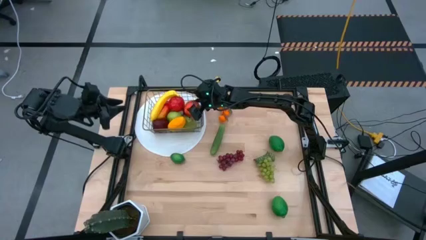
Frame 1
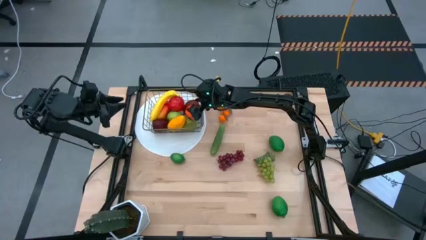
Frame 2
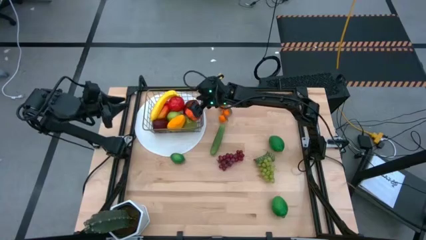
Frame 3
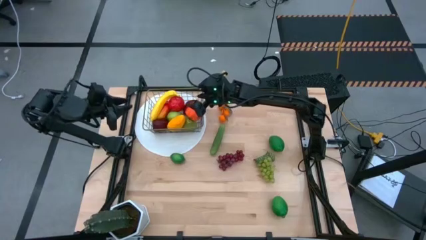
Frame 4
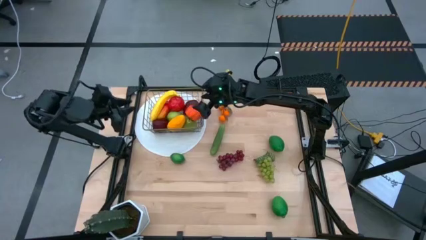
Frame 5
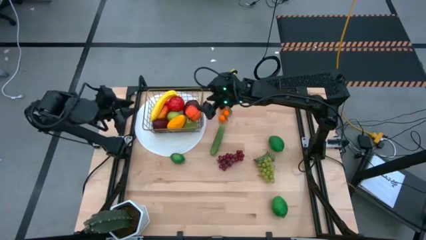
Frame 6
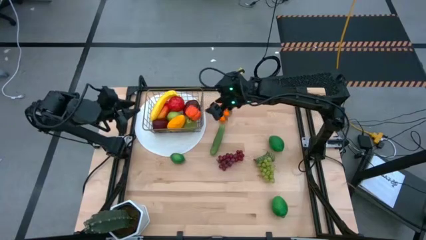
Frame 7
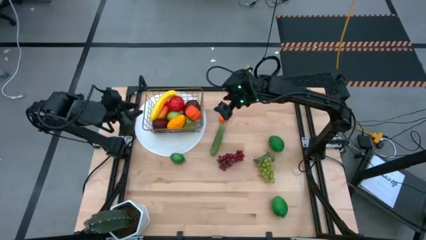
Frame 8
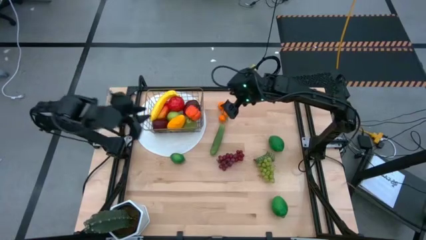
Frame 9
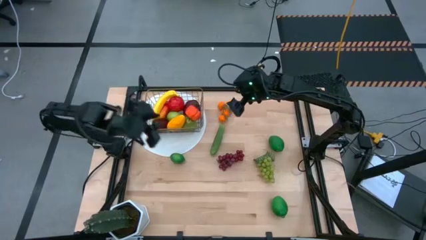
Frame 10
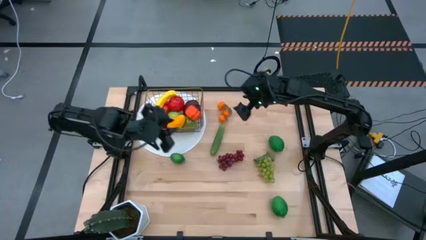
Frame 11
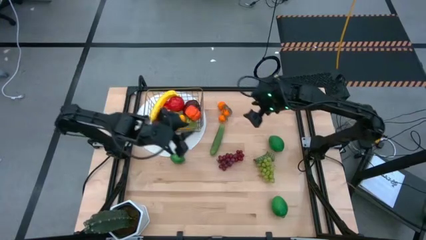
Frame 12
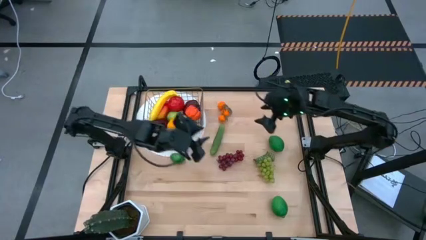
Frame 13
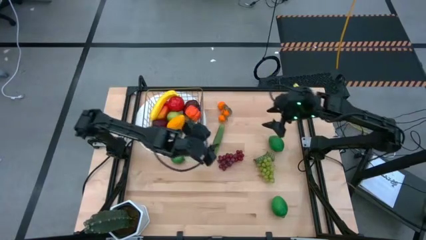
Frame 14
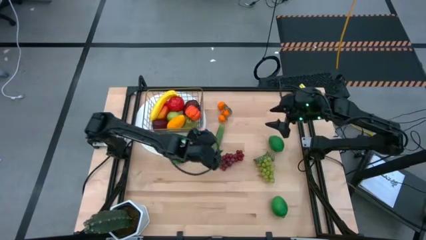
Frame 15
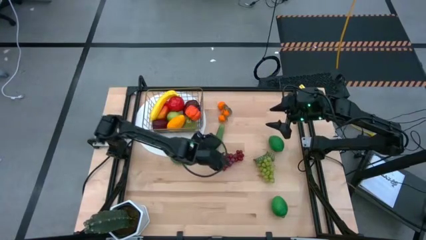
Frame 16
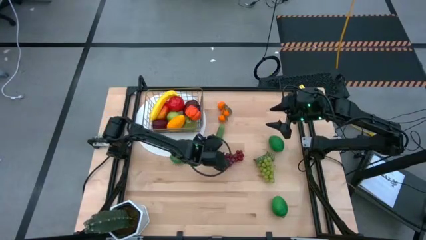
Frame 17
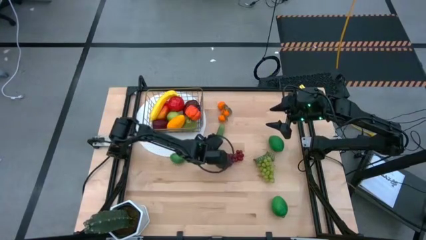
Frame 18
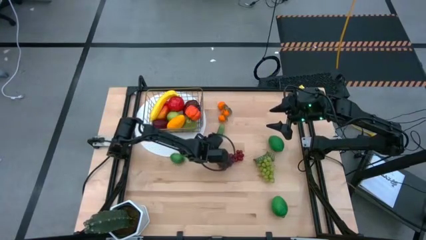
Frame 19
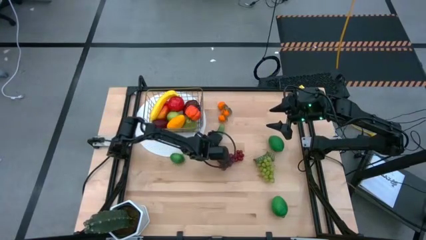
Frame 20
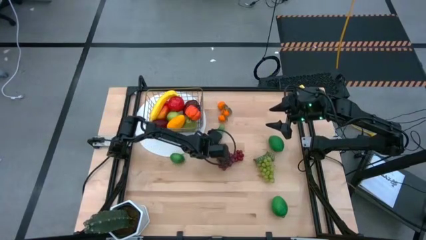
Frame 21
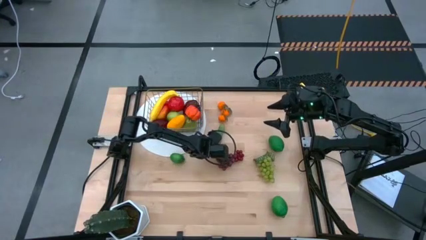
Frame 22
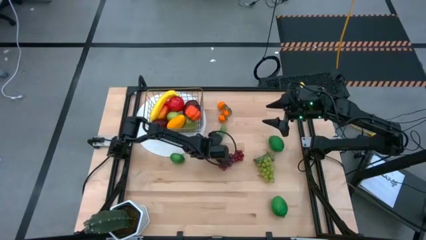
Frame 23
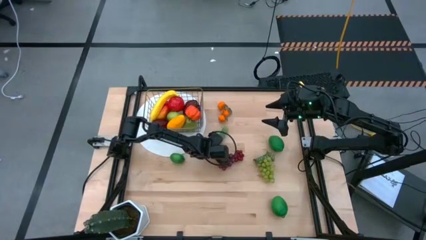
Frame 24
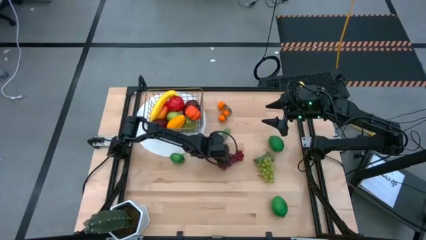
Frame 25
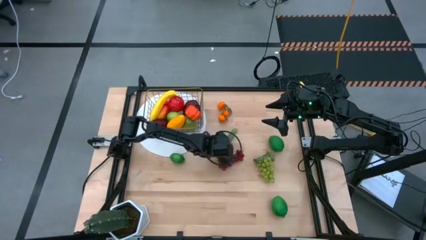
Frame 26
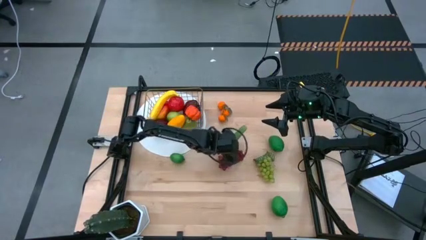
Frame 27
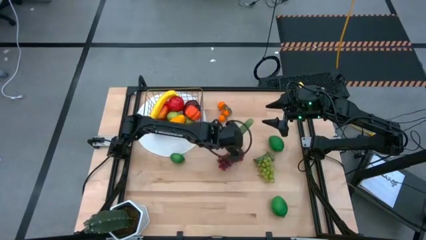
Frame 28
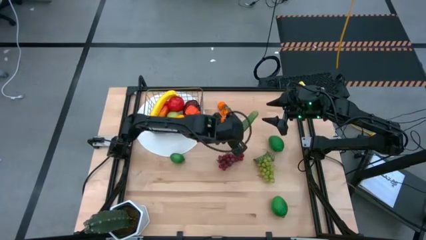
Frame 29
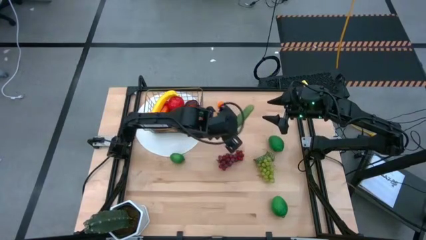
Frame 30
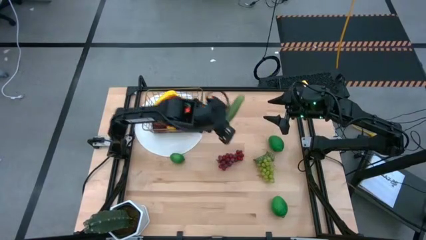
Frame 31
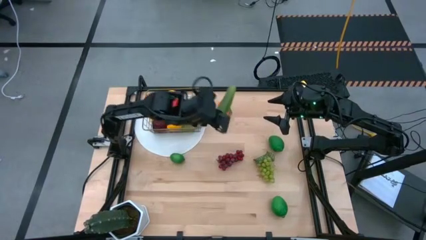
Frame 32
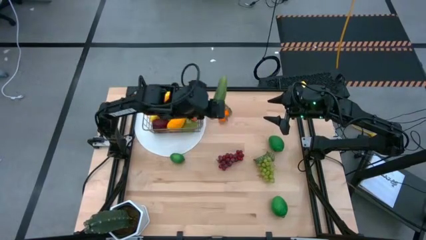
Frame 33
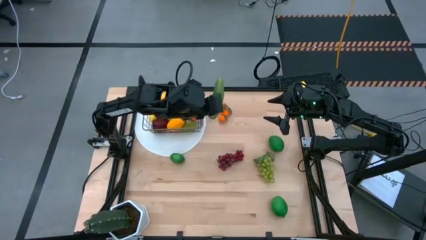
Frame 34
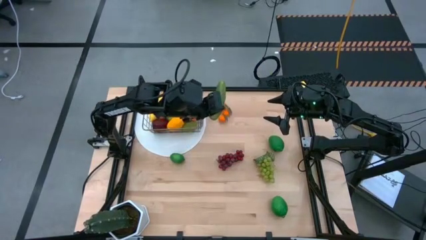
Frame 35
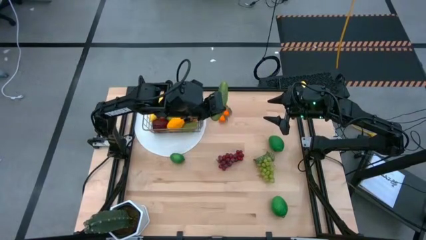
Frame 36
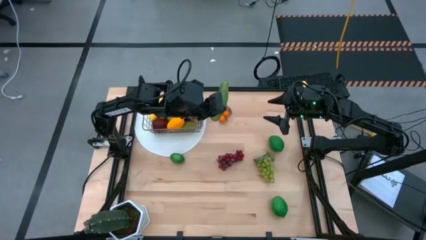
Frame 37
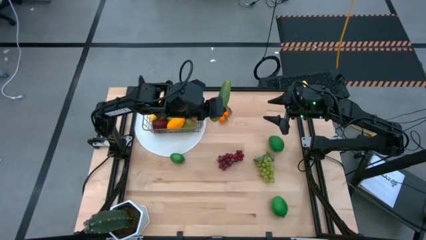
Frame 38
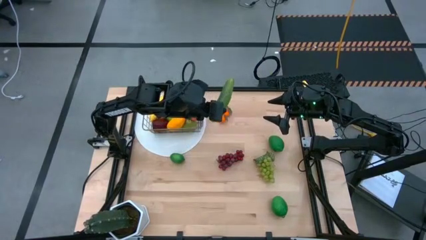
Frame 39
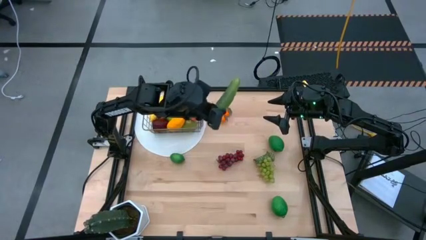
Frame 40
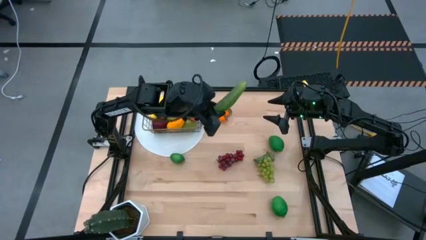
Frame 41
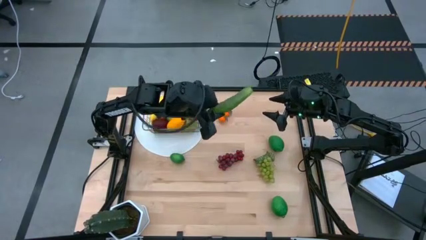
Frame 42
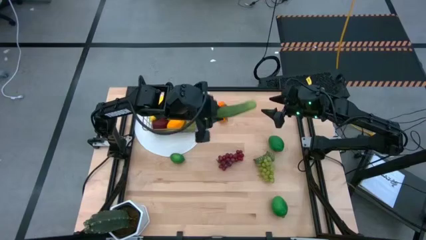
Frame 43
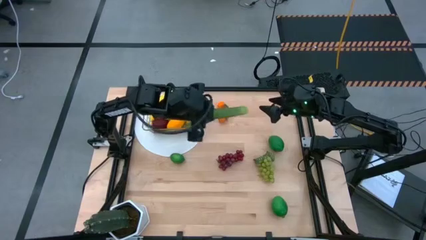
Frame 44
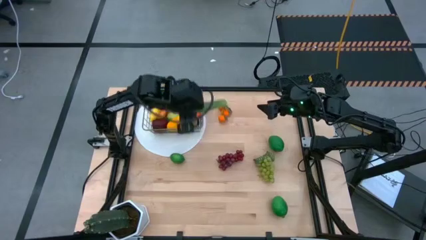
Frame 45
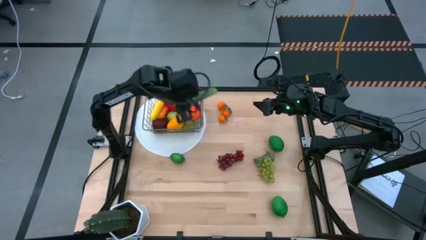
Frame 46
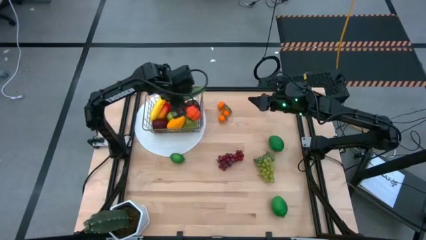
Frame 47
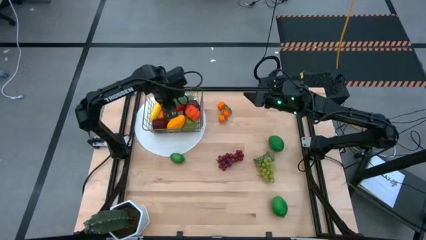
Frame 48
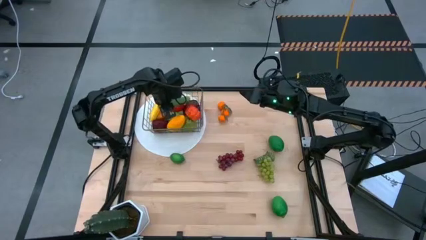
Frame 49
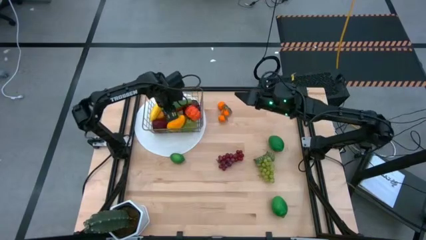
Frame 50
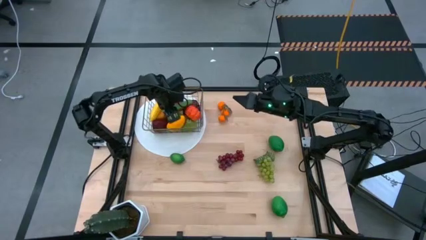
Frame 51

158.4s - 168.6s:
Task: Build produce basket
Put the cucumber into the wired basket

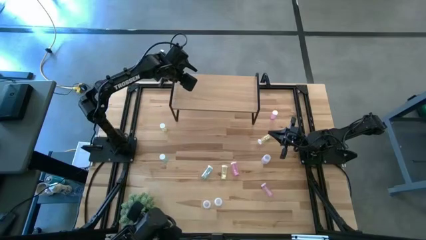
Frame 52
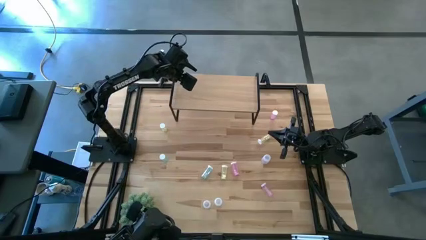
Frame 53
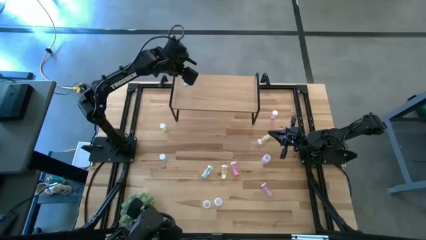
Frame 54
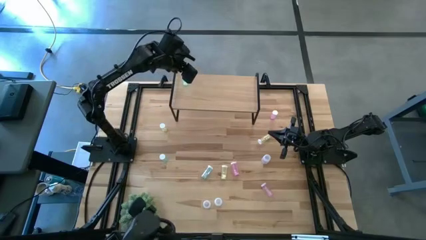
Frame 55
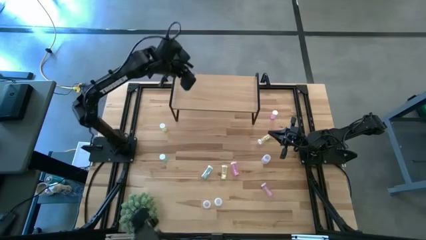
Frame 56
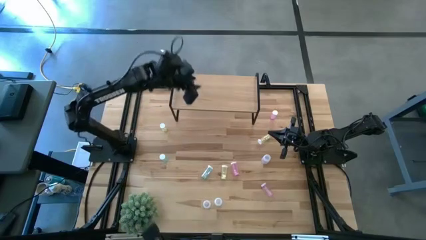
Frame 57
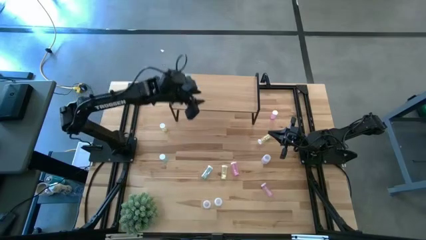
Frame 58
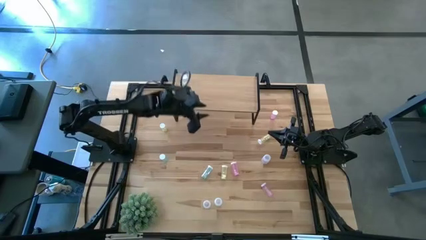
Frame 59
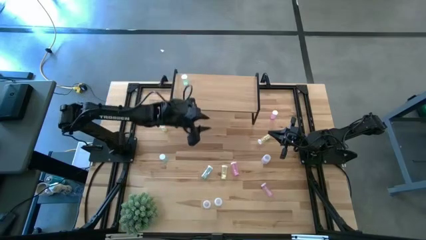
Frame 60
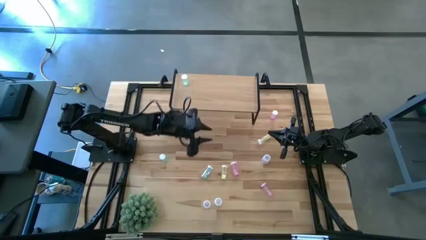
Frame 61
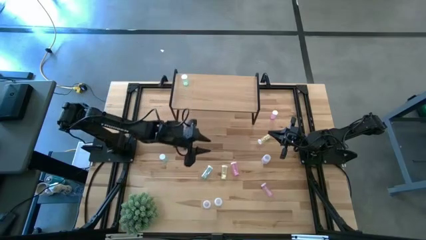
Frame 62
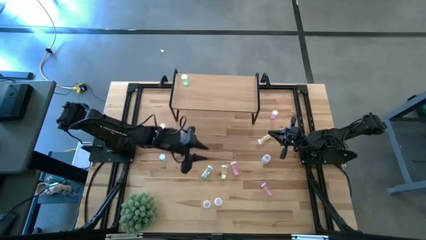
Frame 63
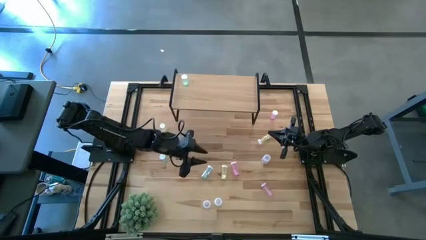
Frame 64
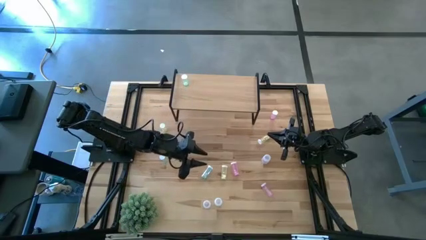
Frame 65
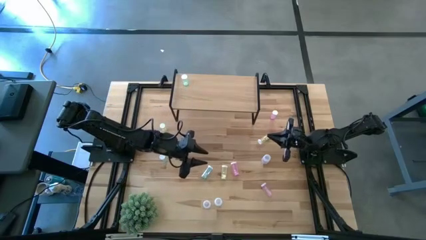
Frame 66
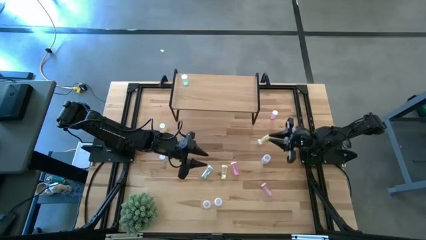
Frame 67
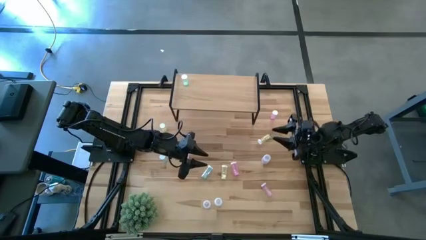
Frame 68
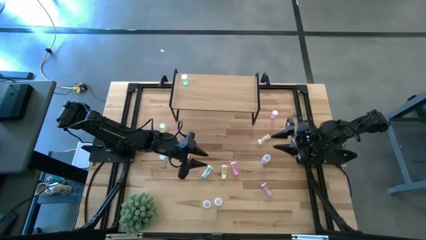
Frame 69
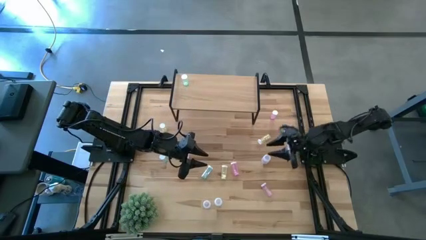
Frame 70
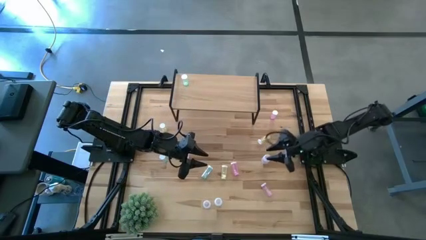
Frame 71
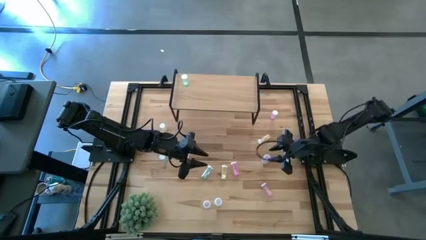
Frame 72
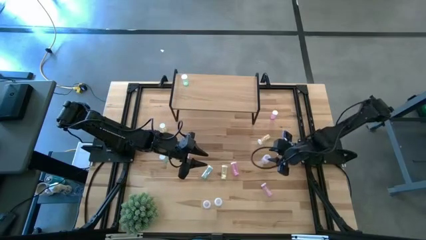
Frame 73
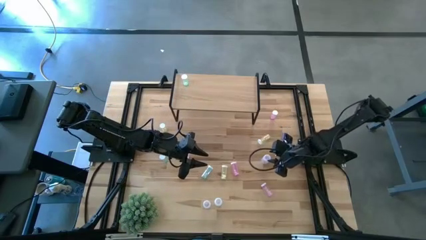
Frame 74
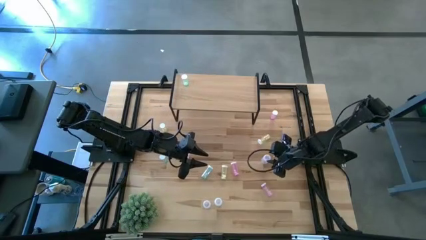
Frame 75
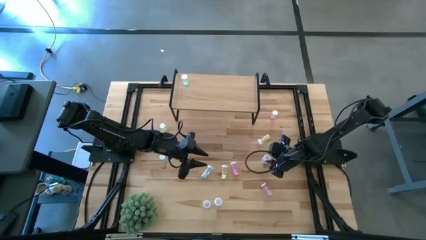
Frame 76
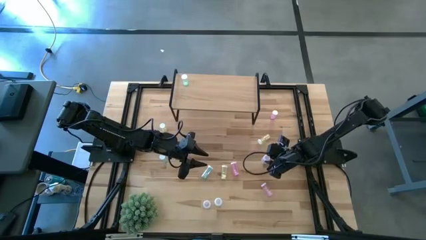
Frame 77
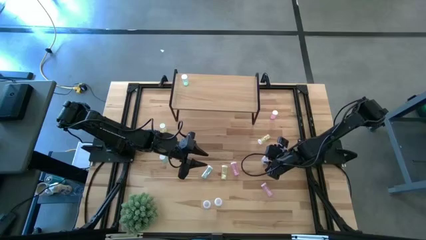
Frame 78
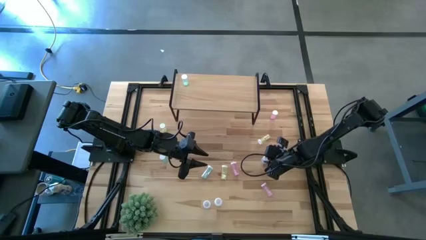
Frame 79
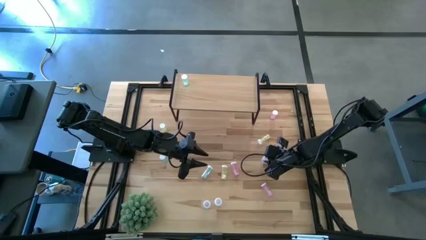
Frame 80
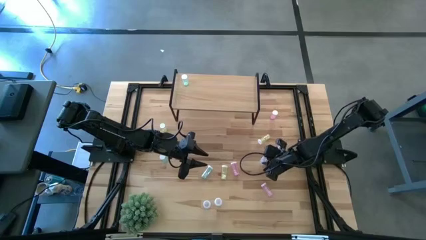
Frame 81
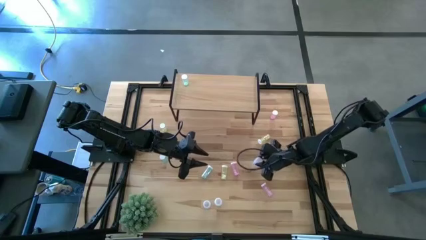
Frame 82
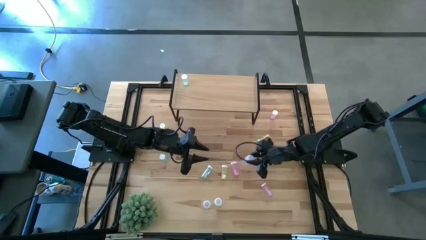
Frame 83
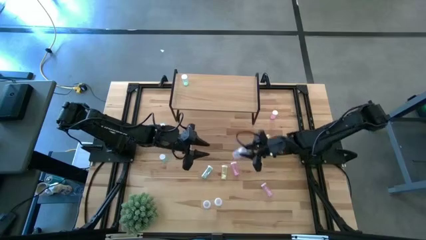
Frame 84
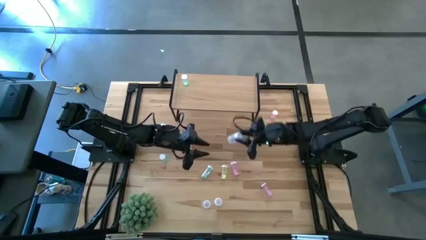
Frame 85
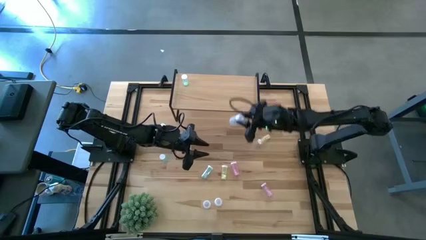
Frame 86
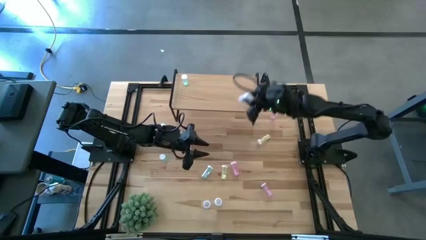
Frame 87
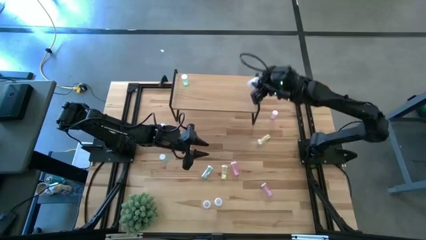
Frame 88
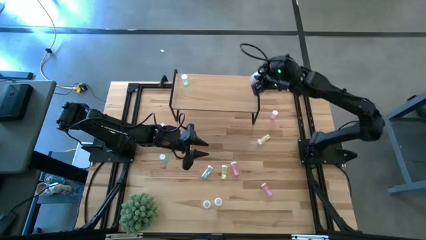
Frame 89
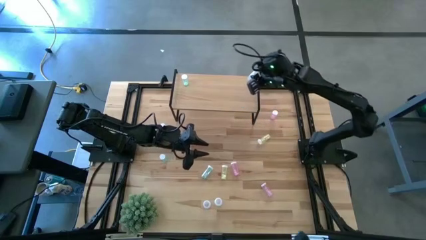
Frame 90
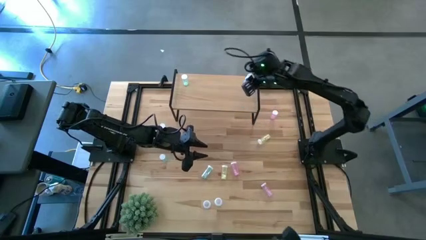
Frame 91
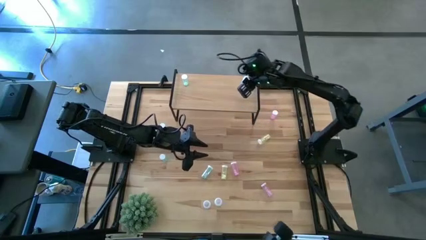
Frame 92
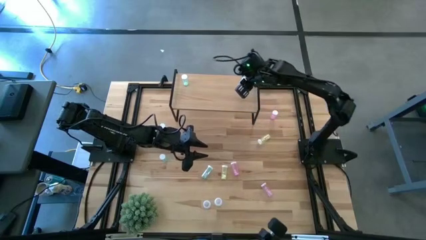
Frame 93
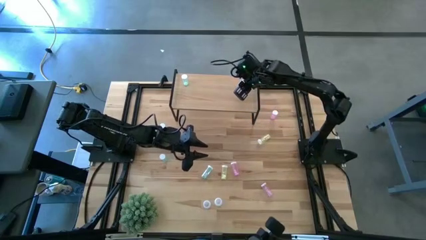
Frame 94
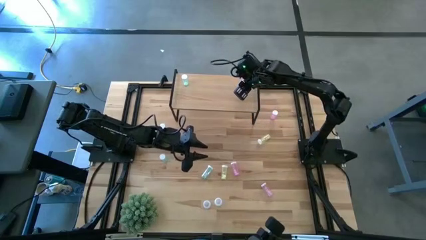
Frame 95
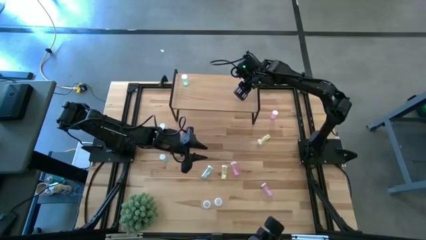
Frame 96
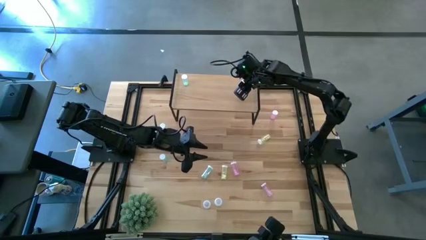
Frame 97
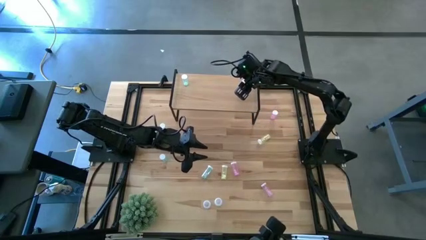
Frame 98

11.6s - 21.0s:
Task: Pick and place medicine bottles onto shelf by color
Put the top white transparent pill bottle on the shelf
